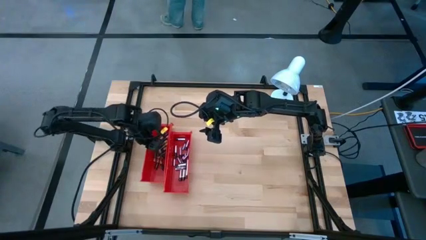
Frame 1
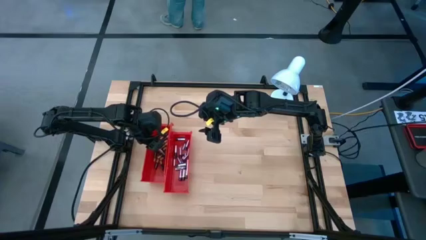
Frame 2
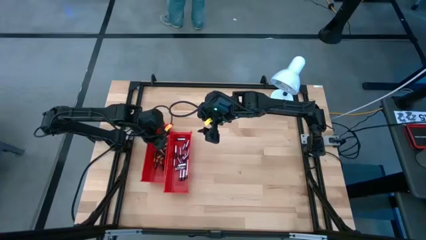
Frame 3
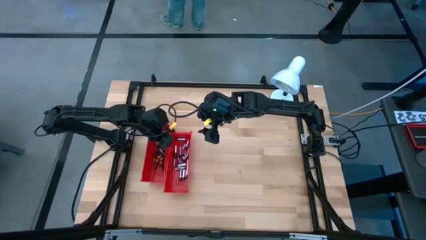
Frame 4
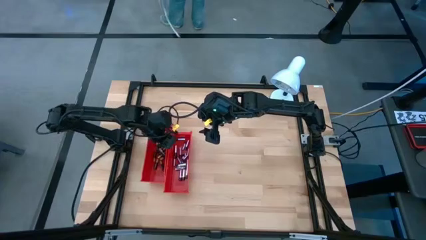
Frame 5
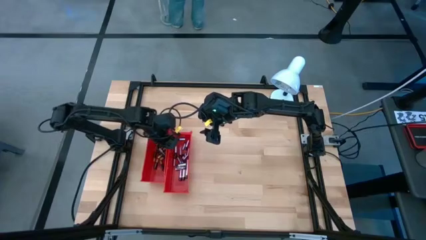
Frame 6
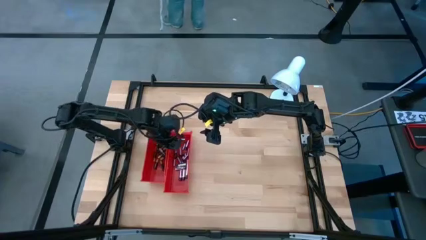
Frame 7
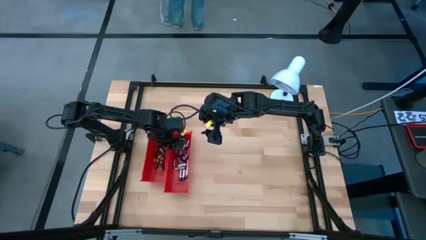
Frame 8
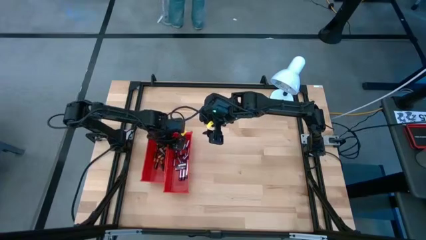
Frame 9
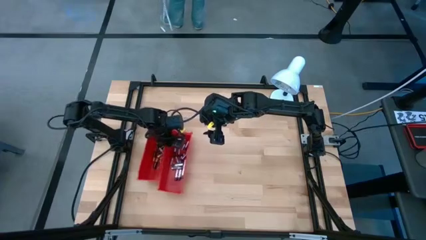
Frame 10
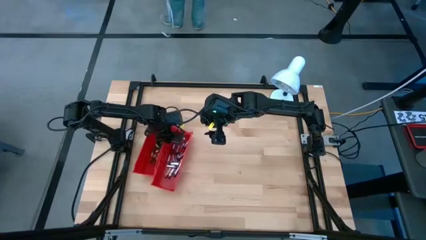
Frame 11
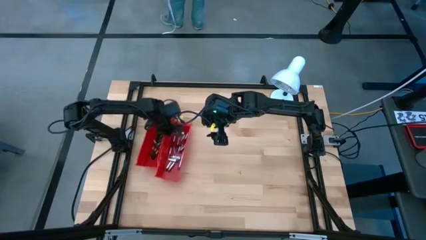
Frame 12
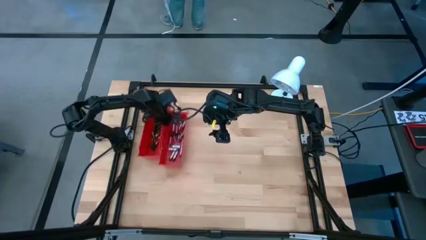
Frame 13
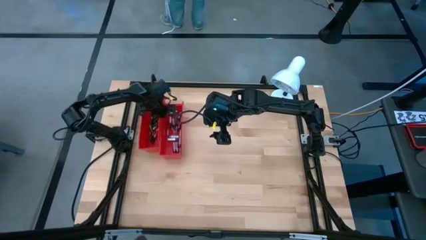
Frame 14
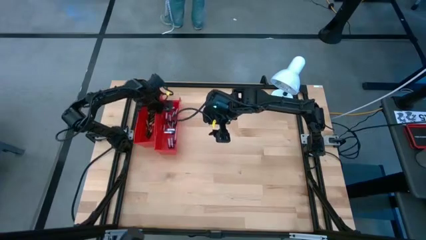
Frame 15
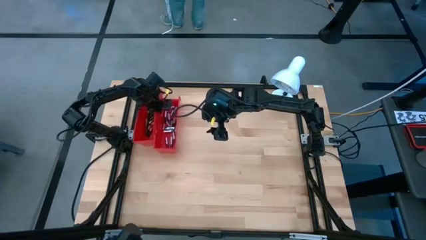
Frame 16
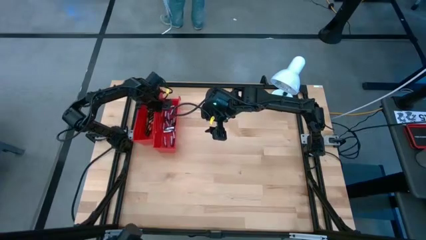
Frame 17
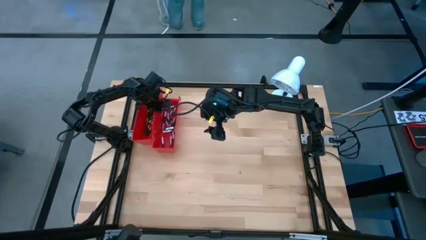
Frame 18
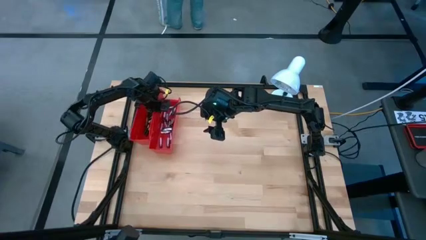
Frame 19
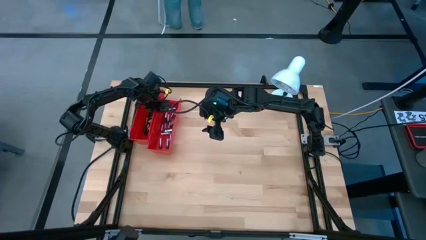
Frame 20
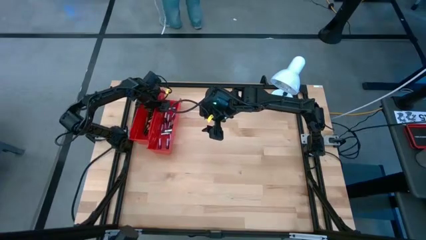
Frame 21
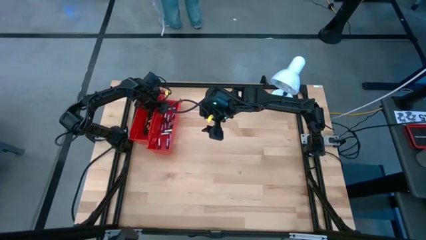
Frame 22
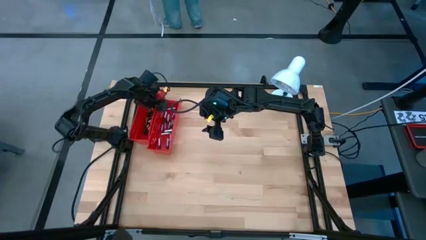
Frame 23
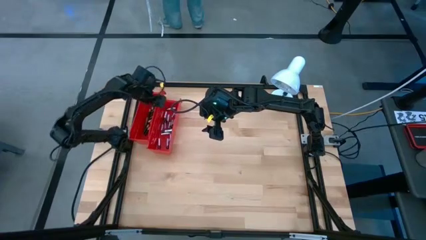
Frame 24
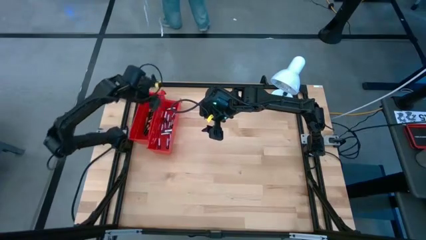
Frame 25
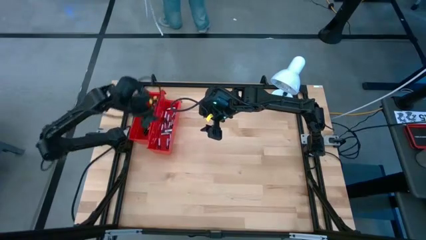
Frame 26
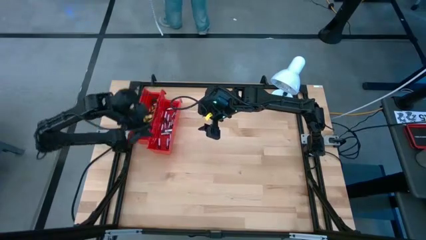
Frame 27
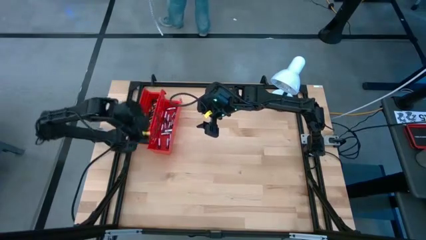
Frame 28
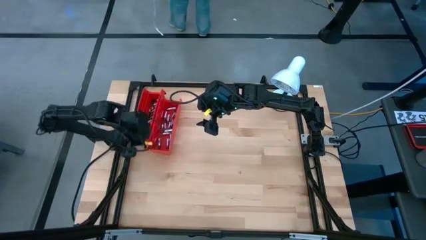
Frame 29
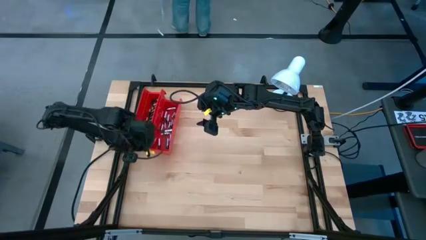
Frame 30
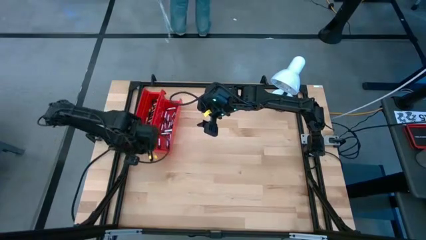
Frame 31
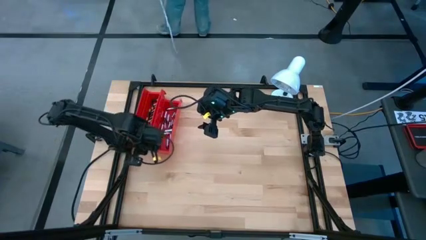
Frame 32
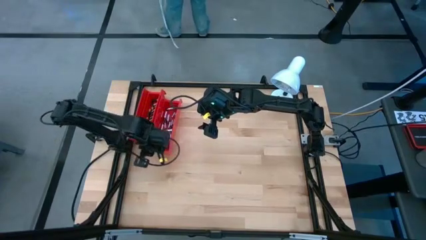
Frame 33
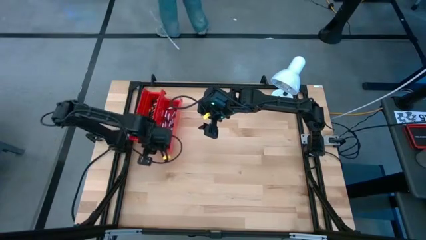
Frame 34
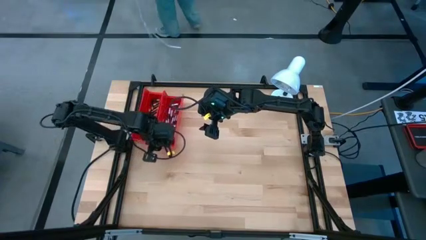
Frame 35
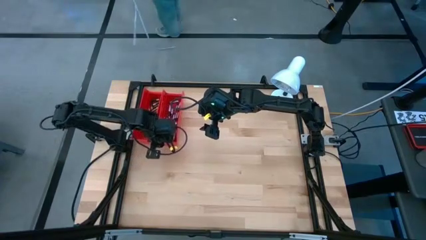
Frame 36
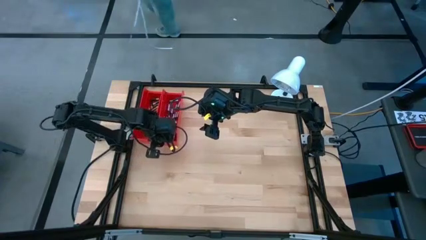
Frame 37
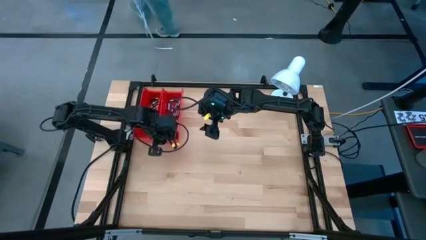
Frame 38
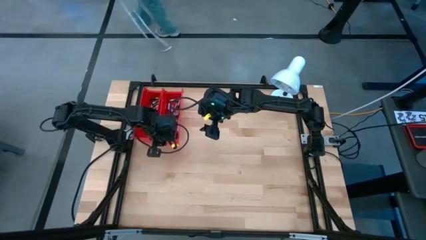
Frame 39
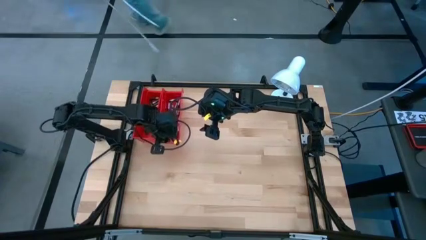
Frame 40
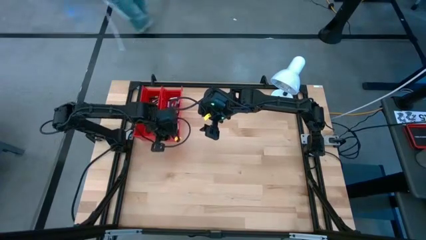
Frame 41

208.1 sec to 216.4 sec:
Task: Sort batteries
Move the bins from the middle left to the top left side of the table

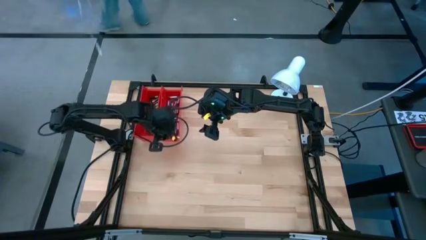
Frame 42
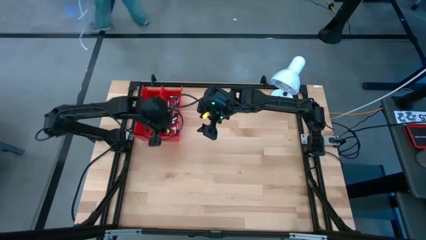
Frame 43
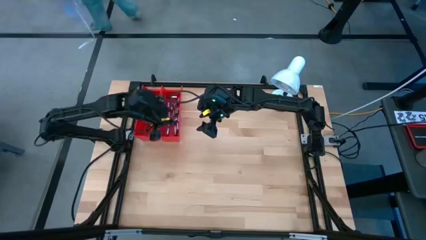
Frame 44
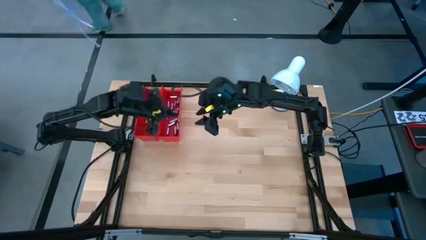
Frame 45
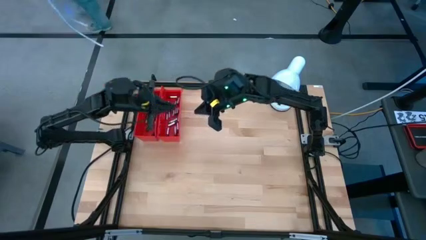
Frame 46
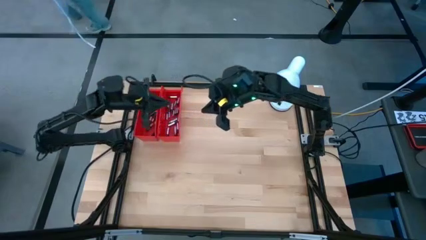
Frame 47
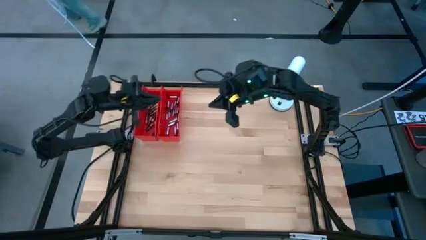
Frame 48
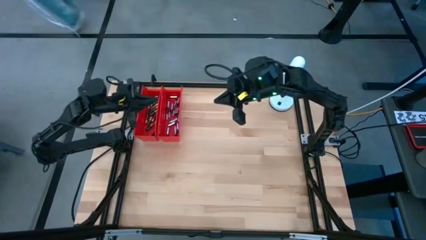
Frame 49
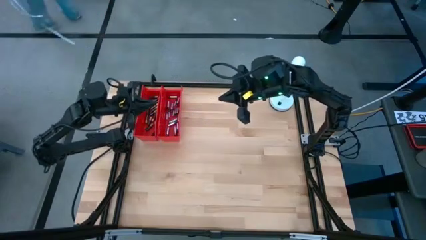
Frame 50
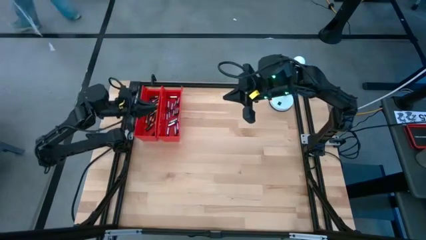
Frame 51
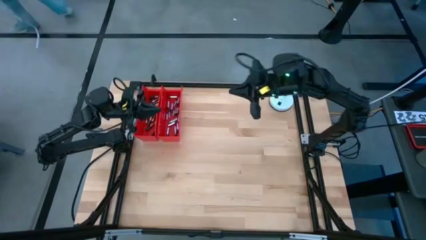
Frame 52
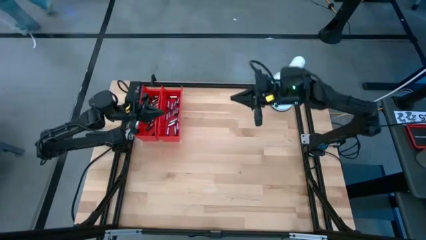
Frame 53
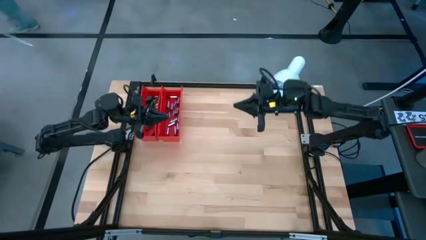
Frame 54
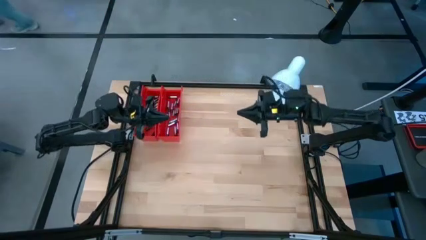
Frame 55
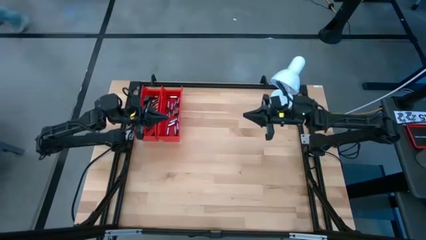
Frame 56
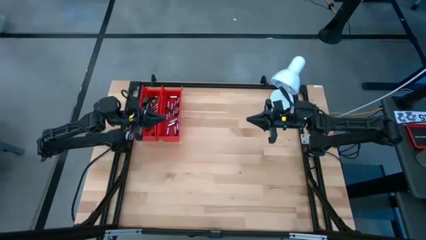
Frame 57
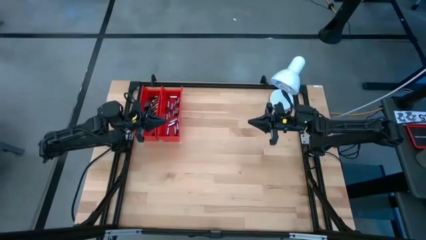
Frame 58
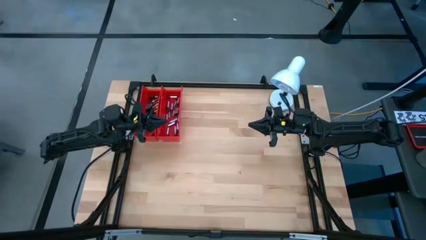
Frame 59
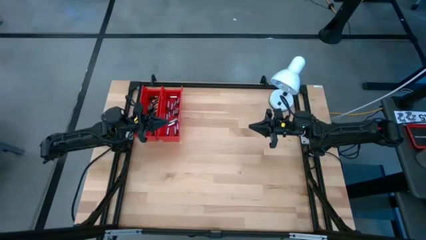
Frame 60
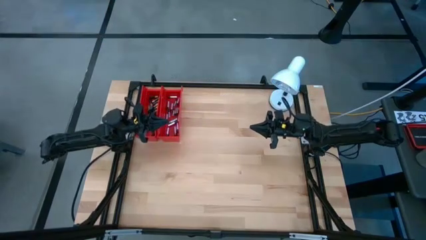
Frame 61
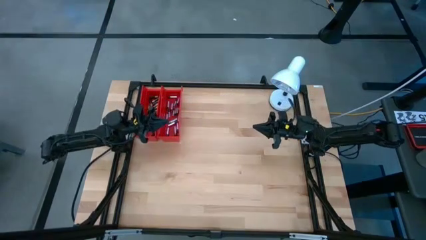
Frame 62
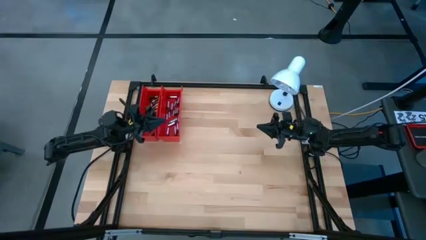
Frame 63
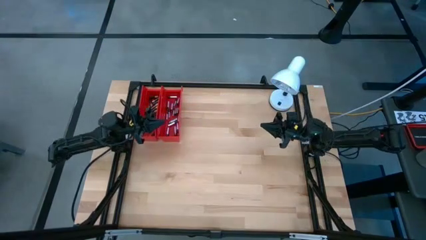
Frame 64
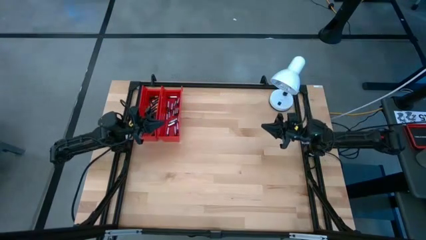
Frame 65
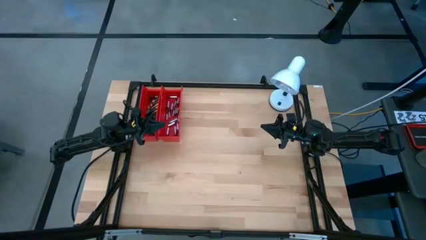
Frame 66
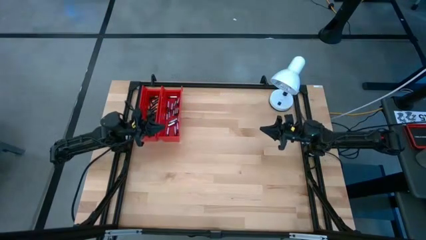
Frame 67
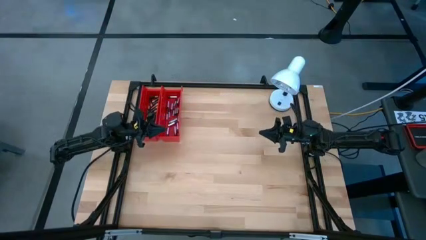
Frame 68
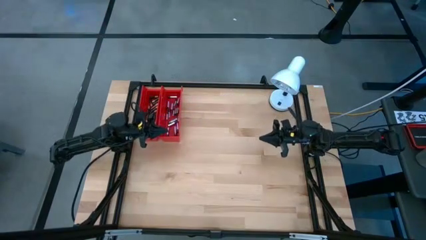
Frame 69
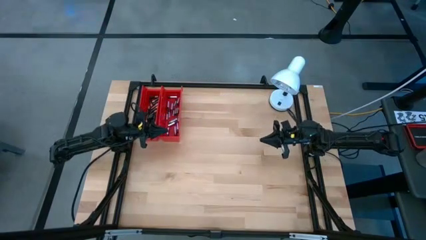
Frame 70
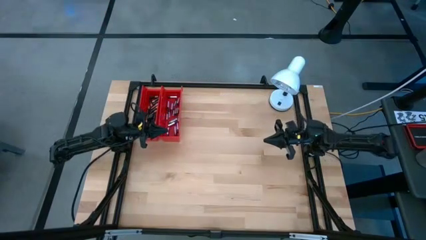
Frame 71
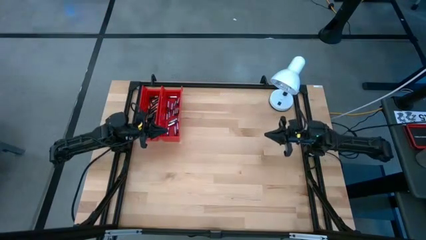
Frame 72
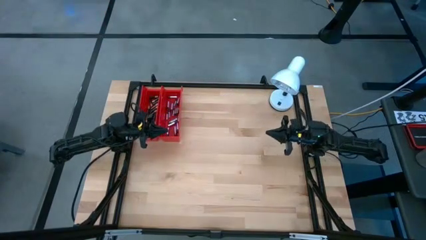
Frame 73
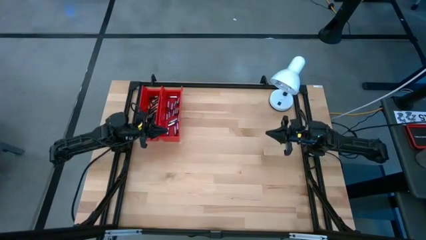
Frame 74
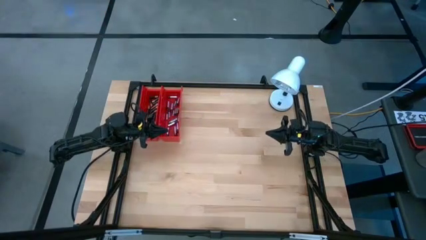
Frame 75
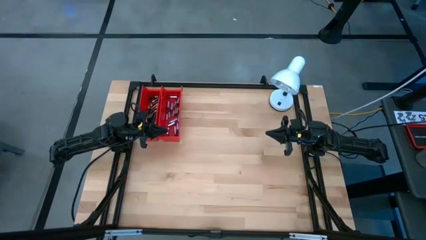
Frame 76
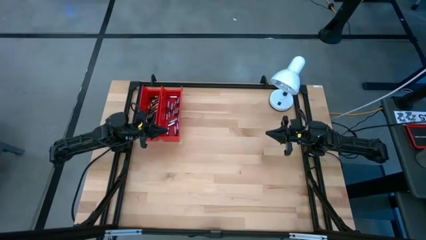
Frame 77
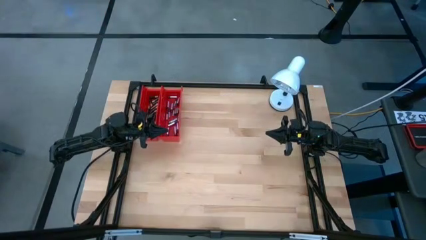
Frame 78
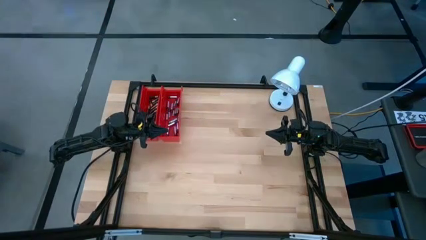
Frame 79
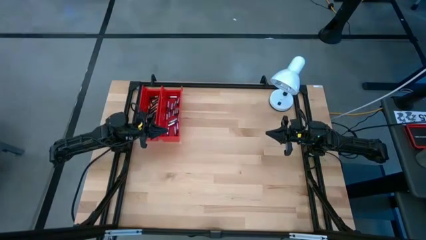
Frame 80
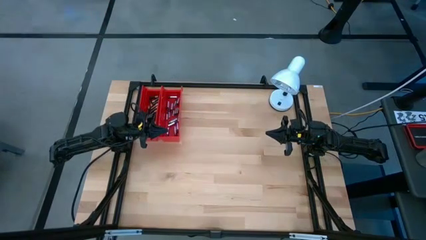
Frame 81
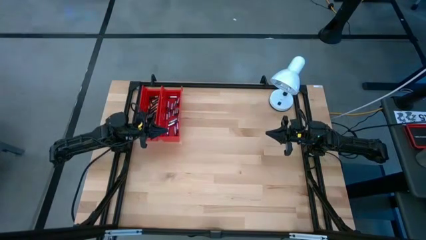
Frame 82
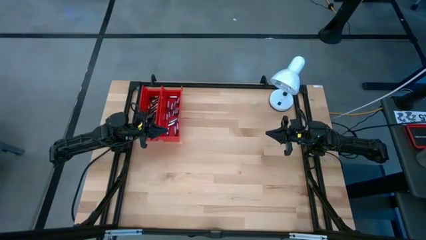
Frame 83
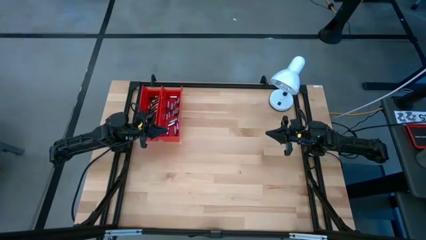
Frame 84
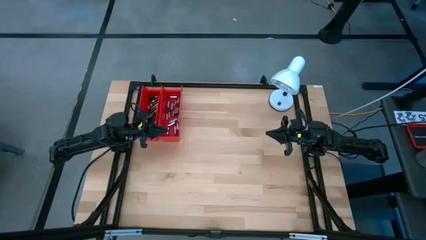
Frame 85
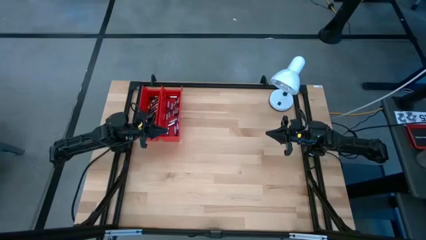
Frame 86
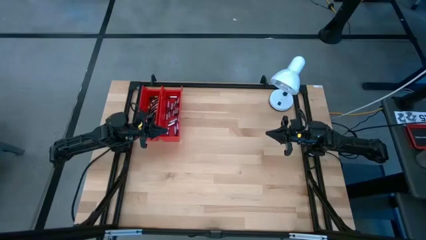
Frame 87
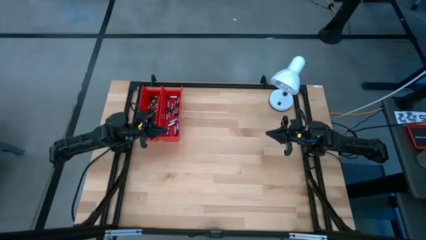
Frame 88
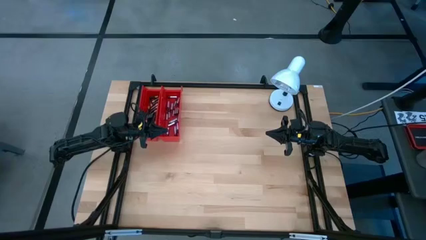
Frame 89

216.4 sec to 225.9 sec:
Return to Home Position
